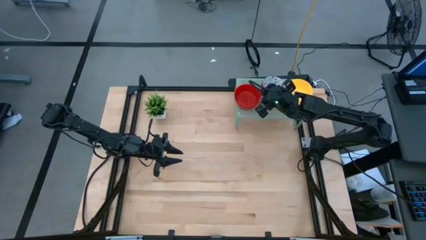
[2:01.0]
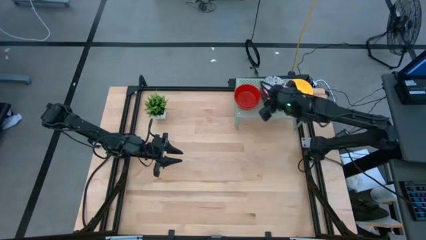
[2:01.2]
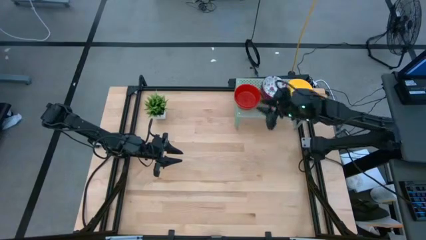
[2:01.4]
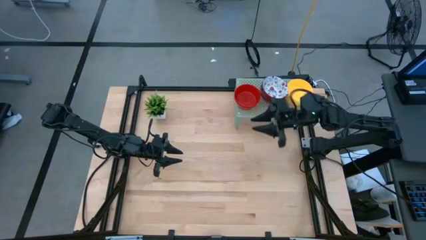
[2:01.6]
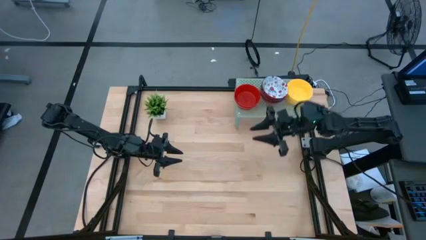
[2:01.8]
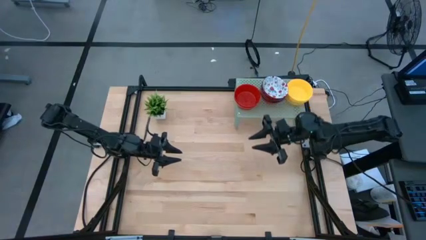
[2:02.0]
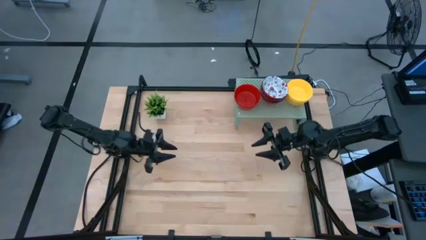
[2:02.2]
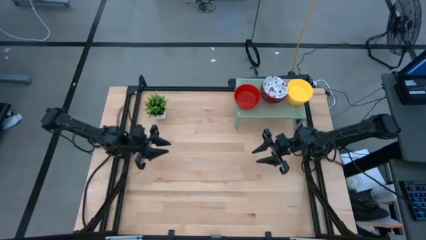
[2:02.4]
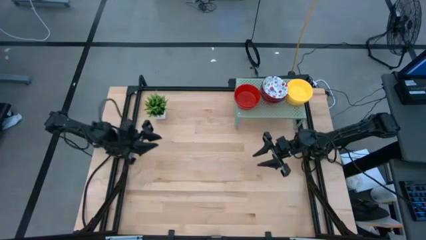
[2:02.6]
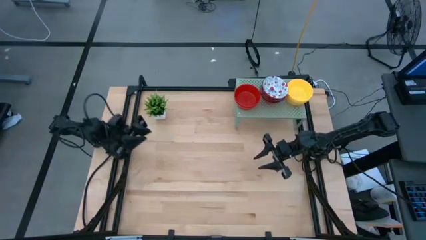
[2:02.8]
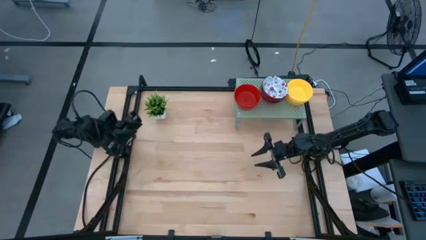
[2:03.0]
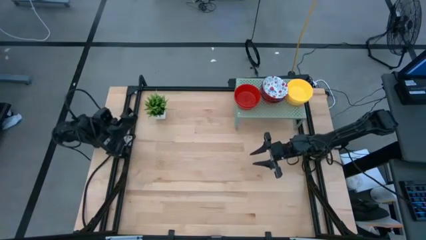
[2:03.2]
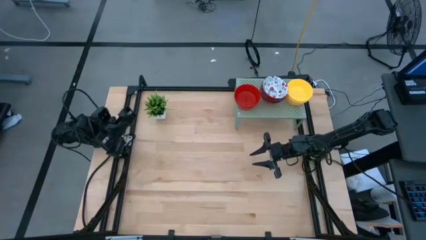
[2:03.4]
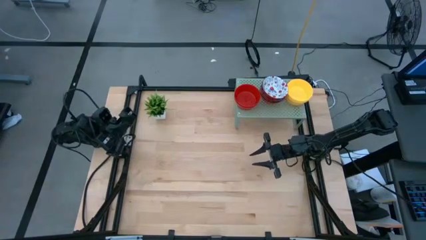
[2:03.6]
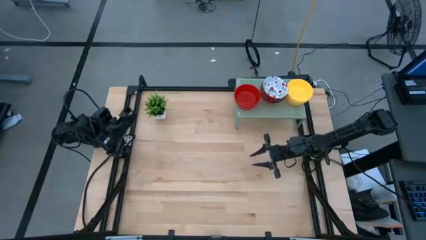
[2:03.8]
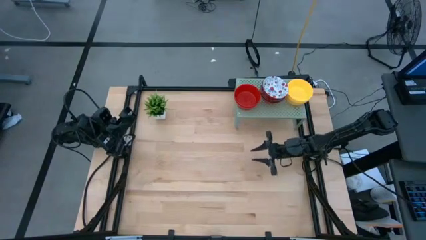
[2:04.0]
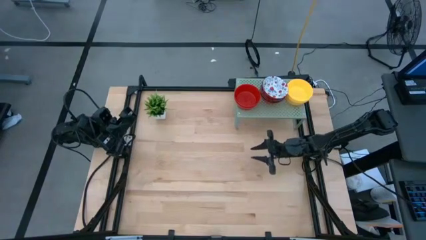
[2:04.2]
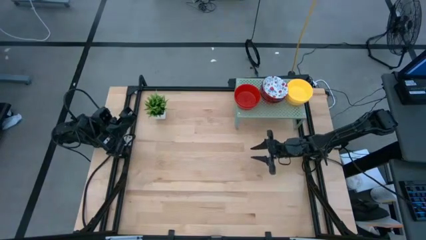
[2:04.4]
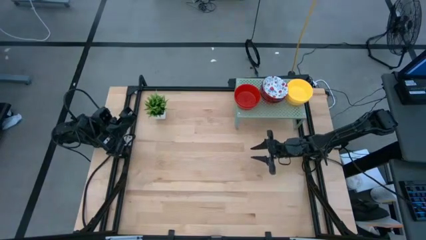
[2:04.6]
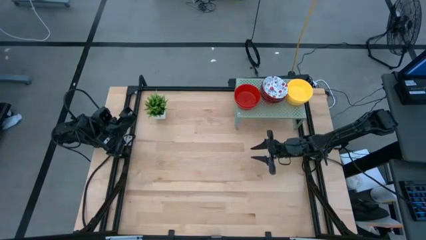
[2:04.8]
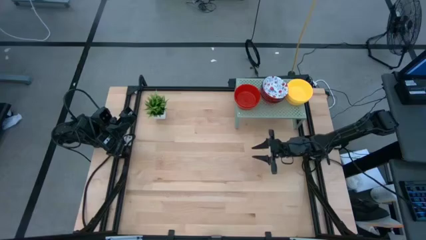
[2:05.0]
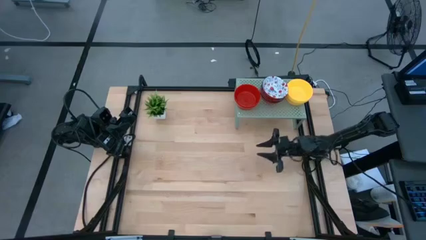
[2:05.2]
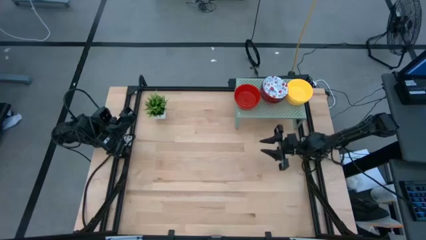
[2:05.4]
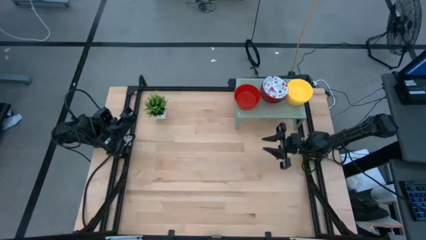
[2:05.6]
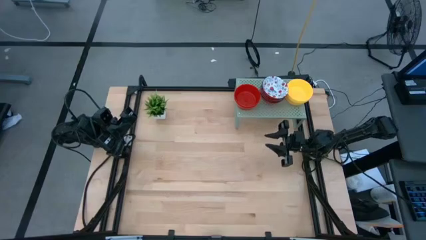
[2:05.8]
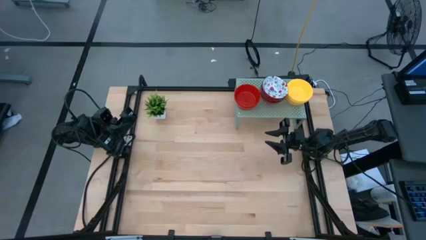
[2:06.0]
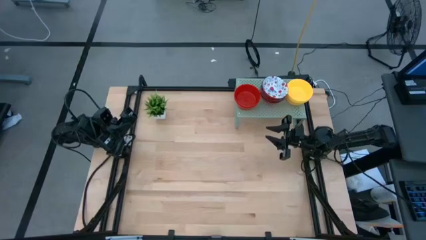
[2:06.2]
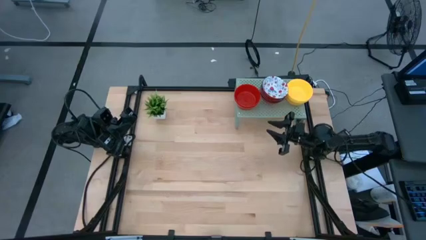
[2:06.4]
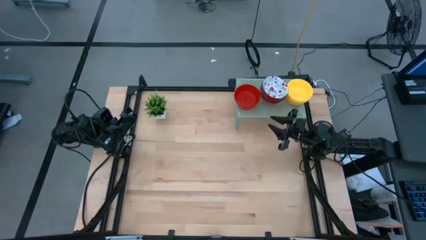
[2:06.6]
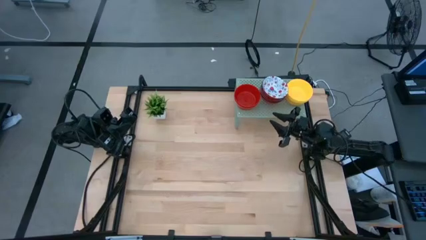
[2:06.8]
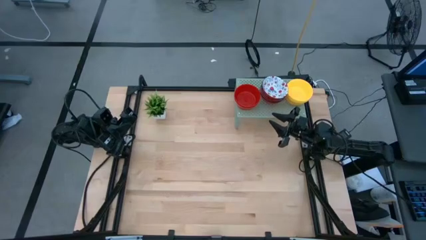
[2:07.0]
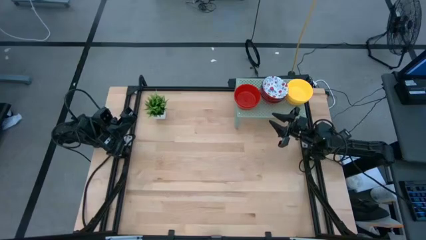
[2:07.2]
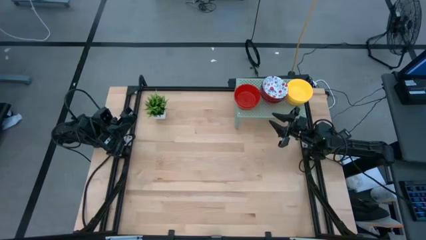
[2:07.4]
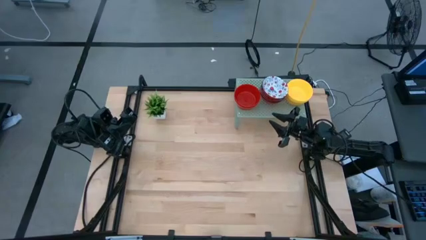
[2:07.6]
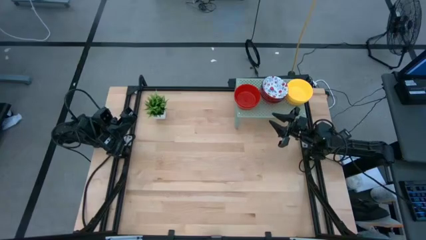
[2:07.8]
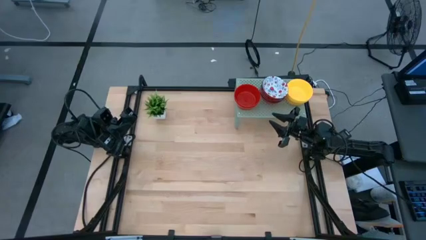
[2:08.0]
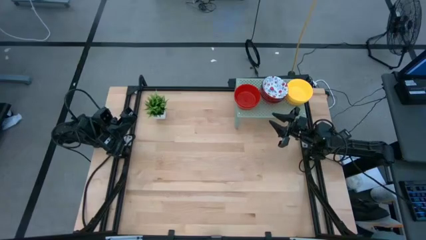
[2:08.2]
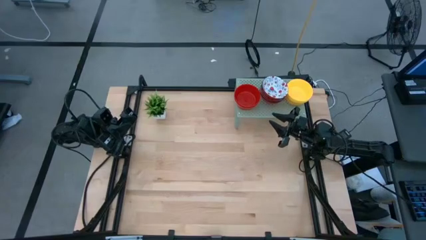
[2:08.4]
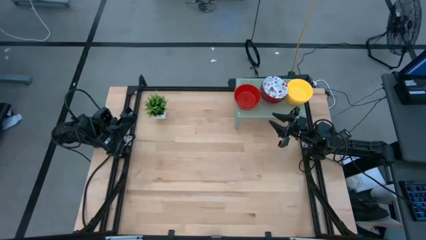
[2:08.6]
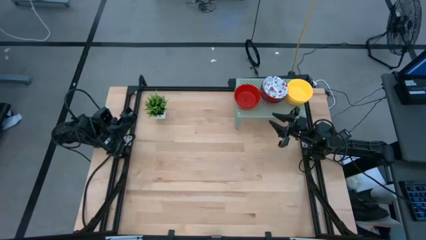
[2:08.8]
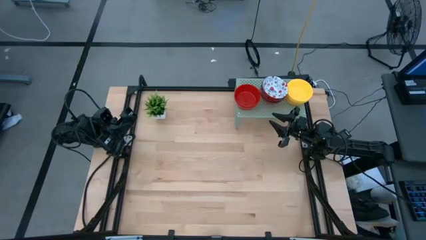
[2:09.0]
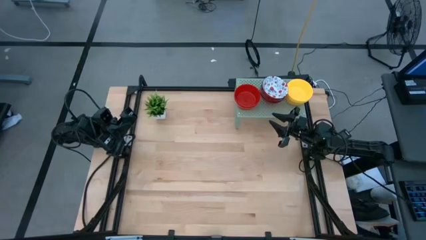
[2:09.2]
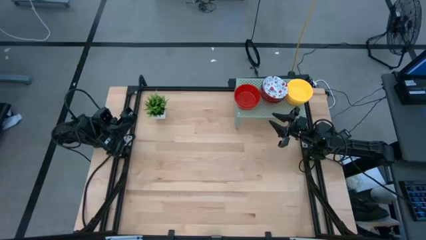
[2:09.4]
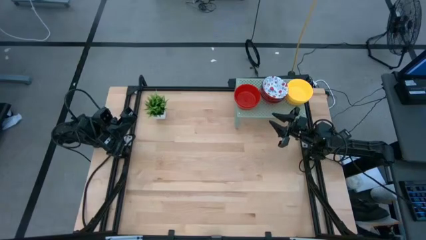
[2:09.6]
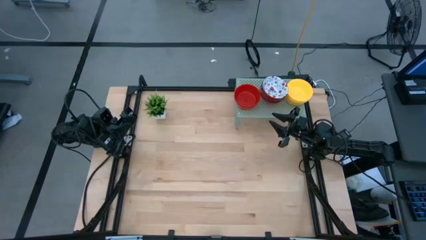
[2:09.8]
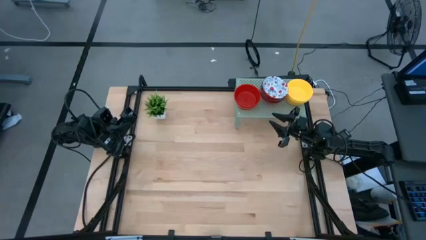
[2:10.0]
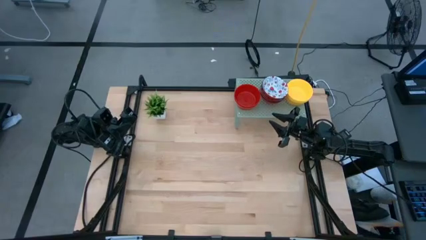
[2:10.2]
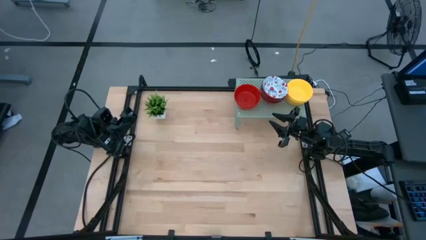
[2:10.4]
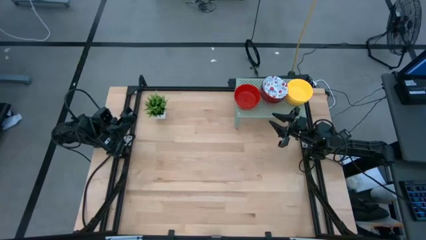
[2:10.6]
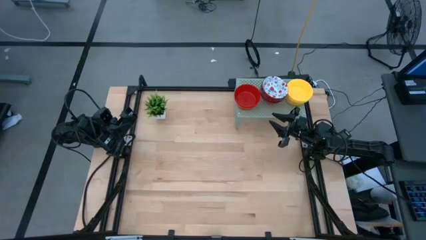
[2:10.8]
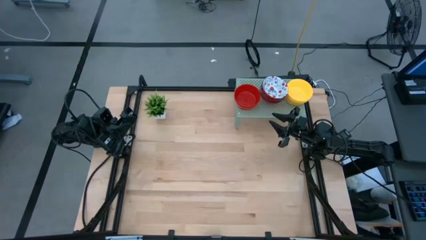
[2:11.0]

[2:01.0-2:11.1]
Task: Pick & Place Mini bowls
Return to Home Position

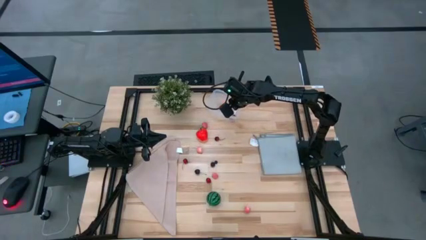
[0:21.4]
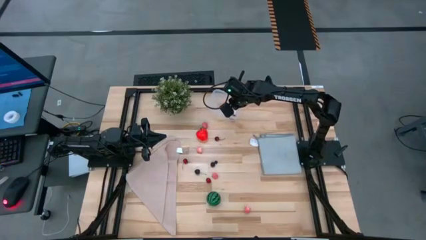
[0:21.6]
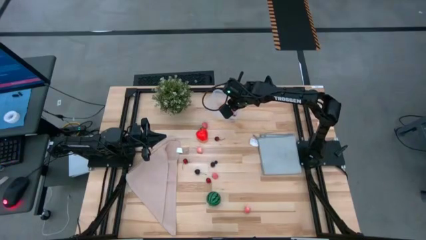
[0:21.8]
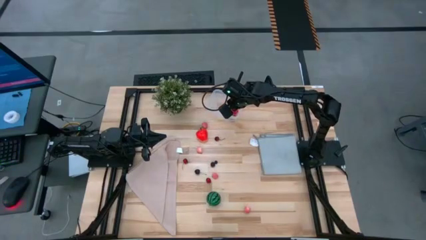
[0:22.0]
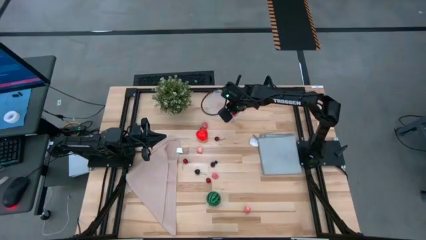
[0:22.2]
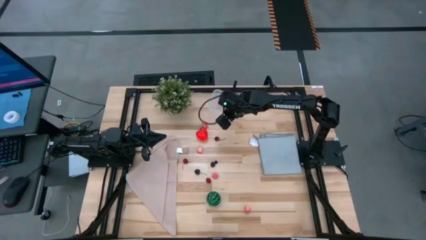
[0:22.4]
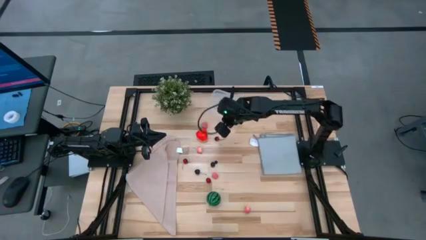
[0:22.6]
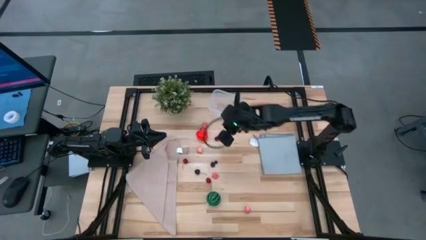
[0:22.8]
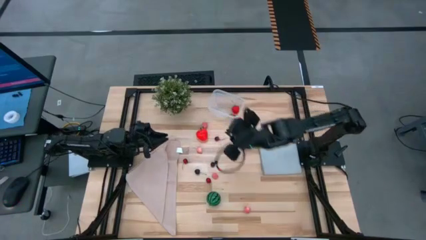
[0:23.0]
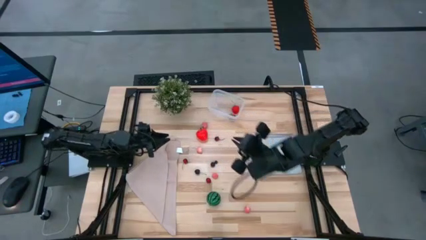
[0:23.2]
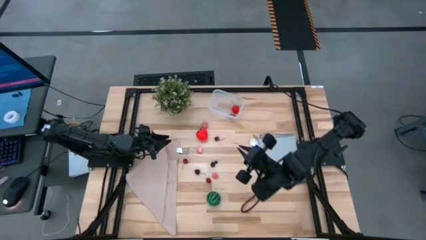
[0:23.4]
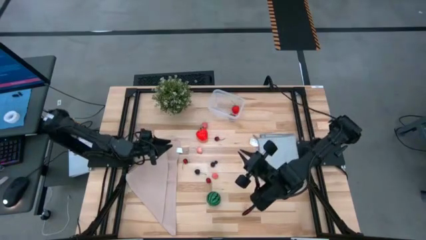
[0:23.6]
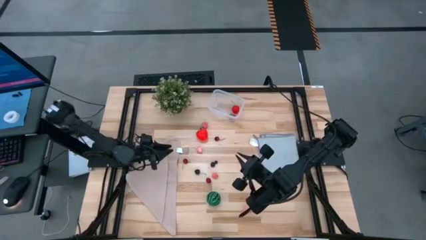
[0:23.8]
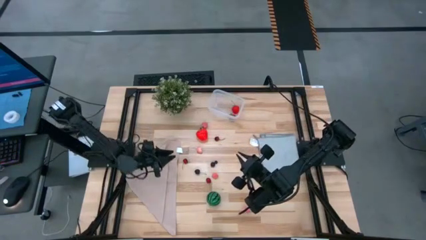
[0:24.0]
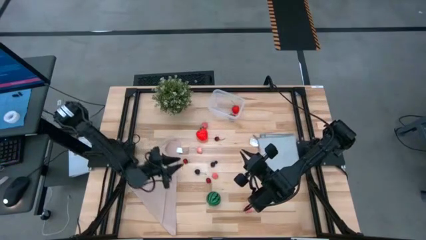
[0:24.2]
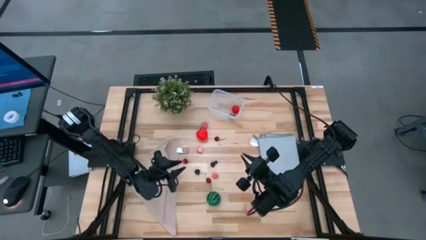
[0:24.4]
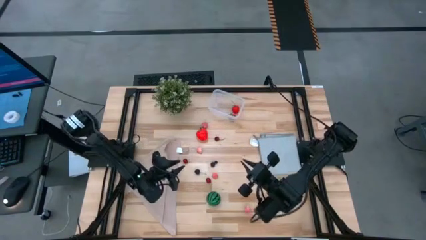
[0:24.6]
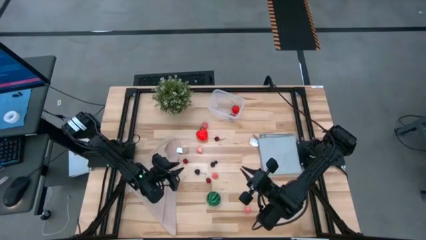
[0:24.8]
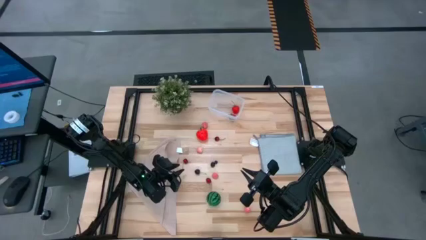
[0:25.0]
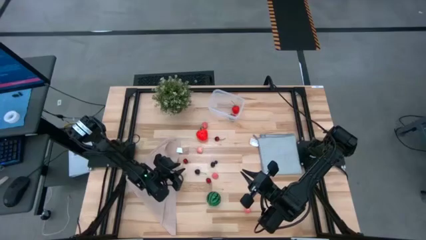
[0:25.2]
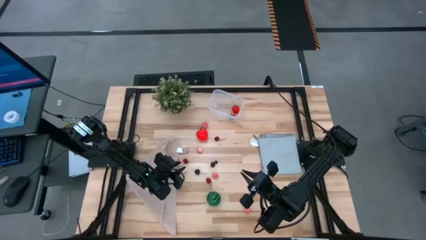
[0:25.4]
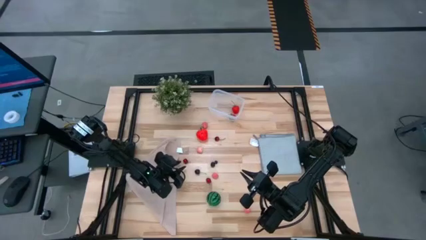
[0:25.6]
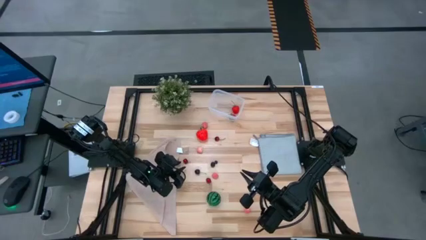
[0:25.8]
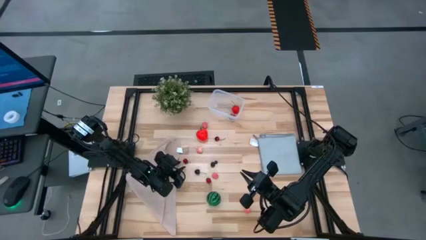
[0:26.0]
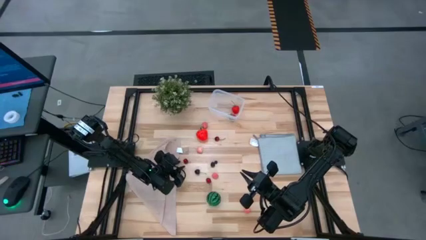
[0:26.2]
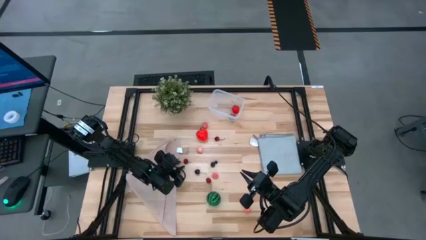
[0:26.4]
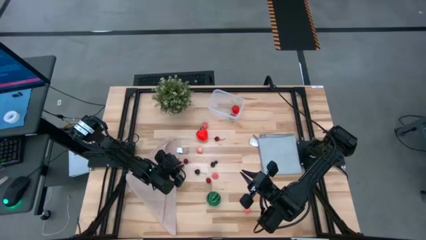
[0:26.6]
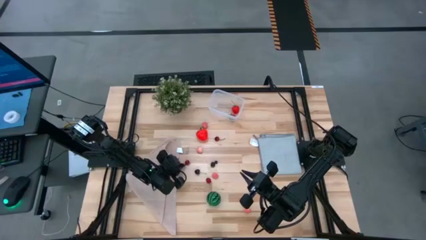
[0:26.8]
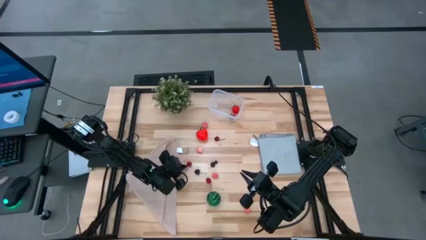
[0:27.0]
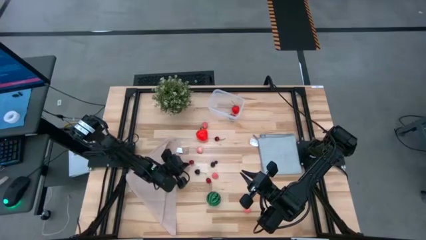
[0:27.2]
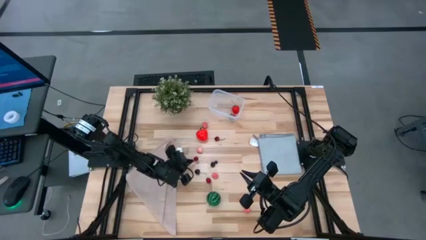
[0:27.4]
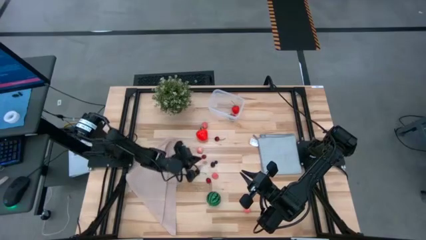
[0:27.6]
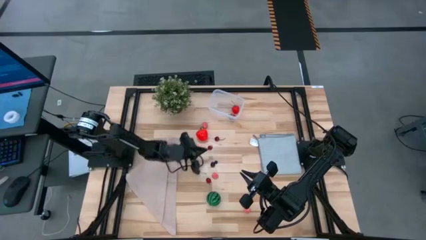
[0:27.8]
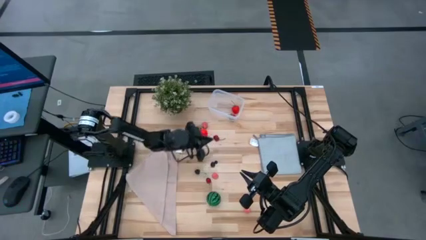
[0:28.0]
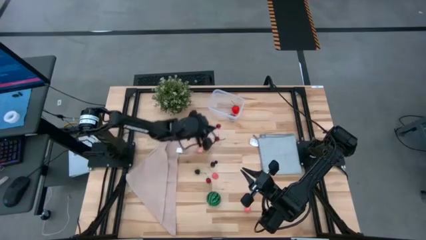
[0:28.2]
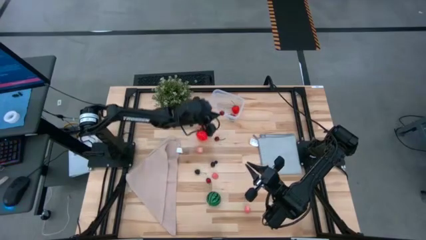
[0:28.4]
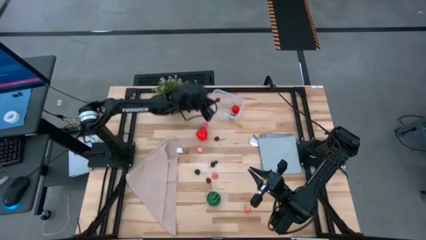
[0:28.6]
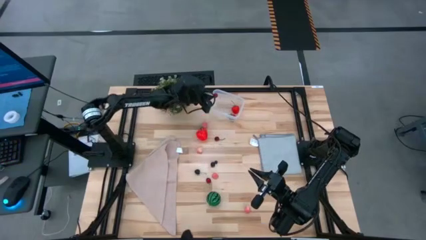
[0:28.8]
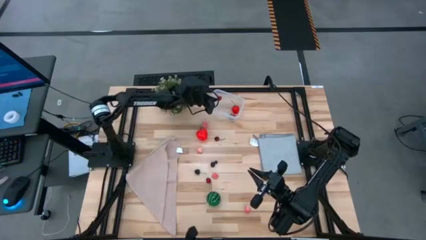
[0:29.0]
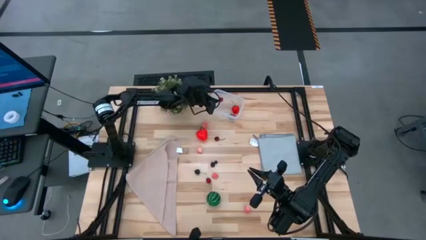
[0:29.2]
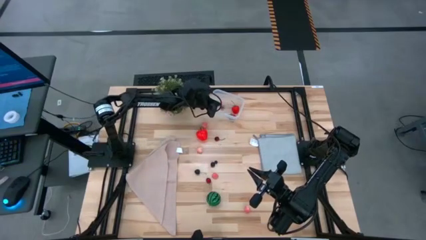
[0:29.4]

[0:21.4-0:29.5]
Task: Pick and placing Produce into tupperware
Put the red cherry into the transparent bin
